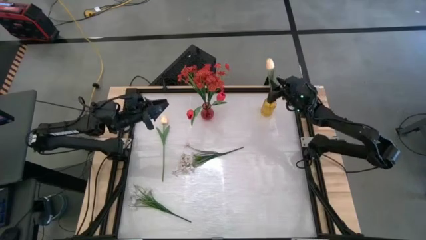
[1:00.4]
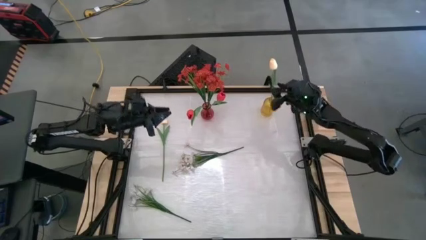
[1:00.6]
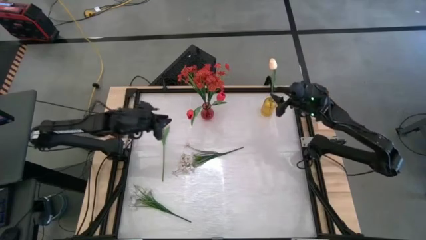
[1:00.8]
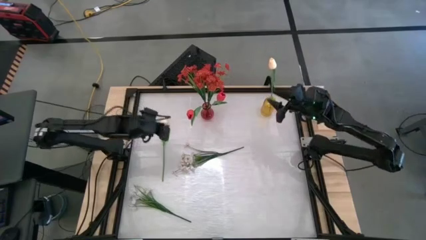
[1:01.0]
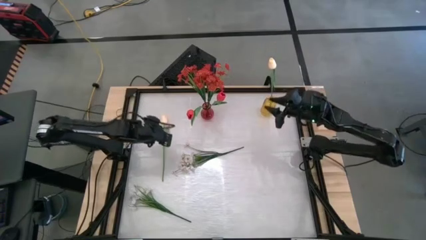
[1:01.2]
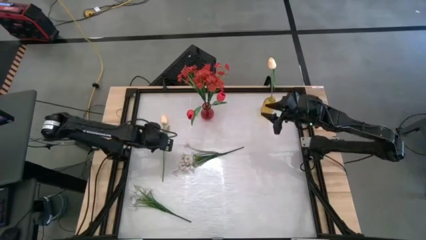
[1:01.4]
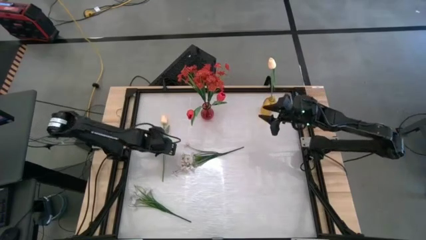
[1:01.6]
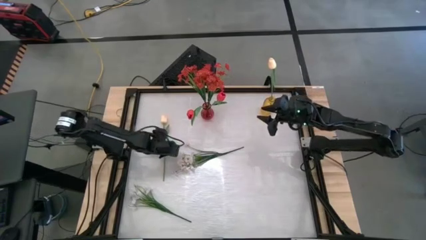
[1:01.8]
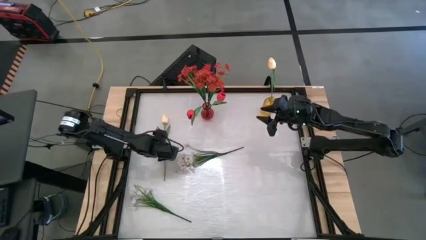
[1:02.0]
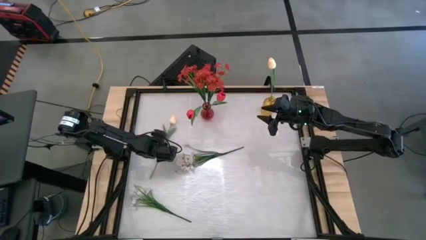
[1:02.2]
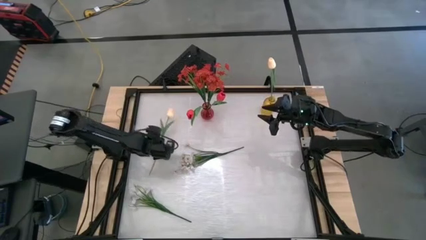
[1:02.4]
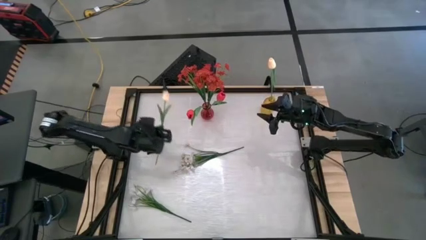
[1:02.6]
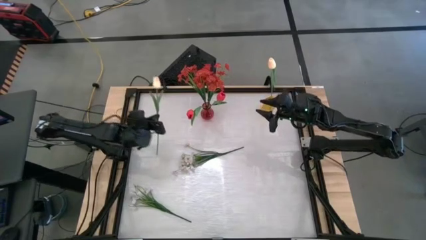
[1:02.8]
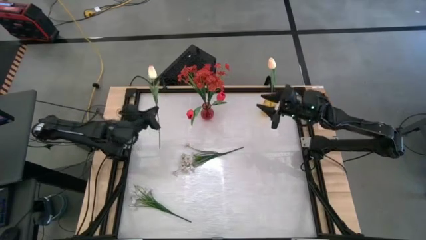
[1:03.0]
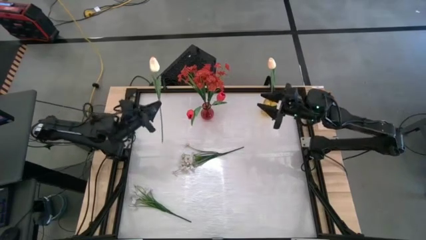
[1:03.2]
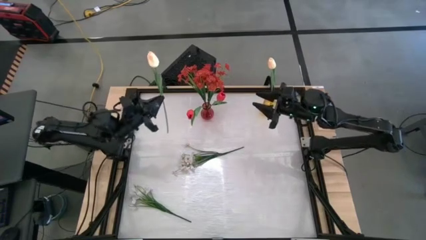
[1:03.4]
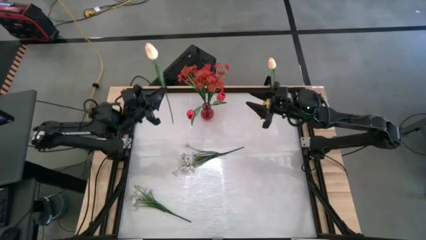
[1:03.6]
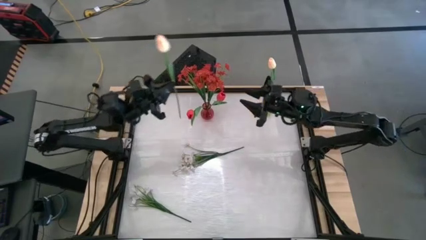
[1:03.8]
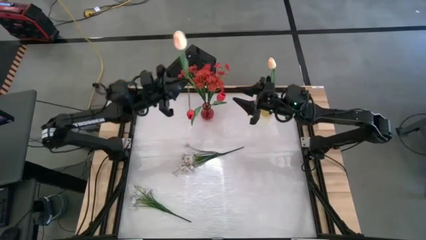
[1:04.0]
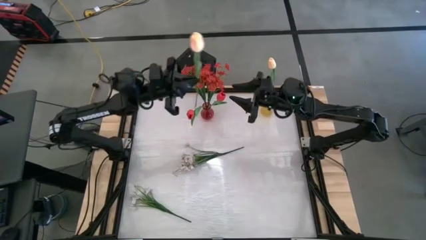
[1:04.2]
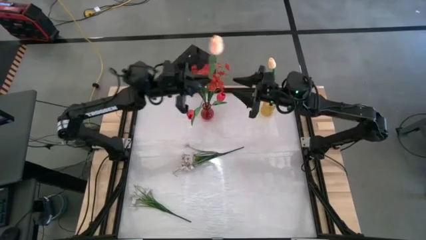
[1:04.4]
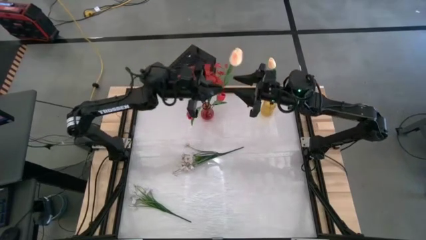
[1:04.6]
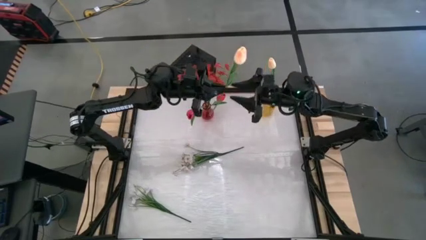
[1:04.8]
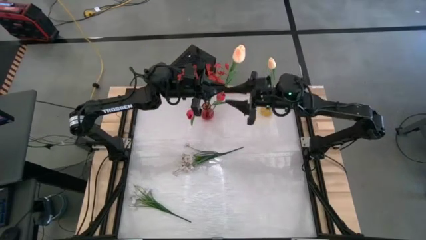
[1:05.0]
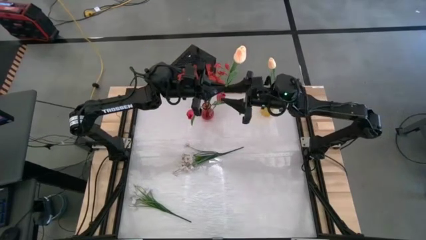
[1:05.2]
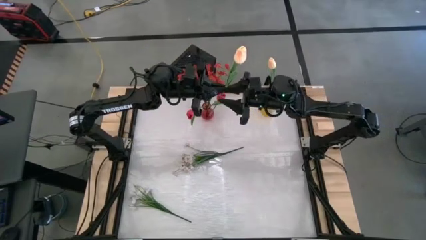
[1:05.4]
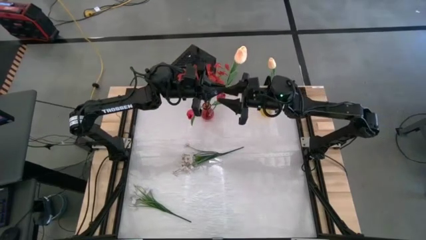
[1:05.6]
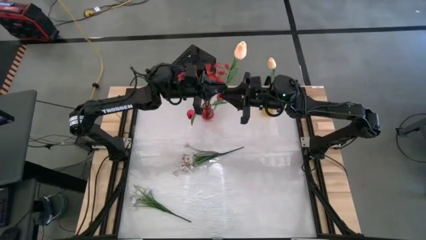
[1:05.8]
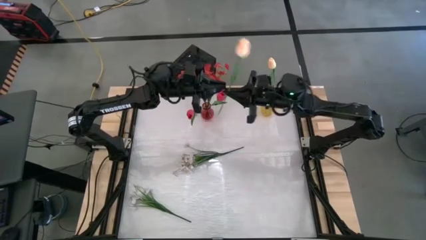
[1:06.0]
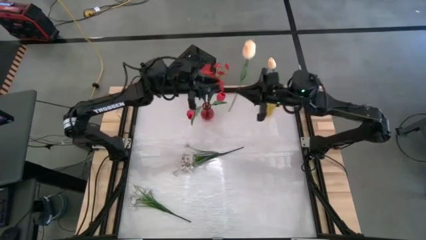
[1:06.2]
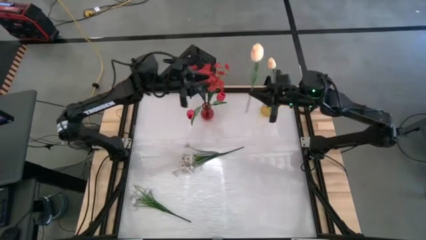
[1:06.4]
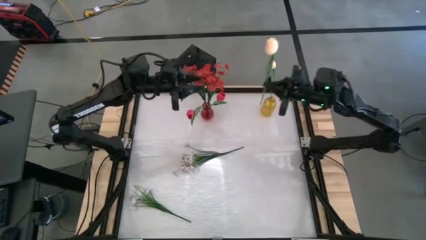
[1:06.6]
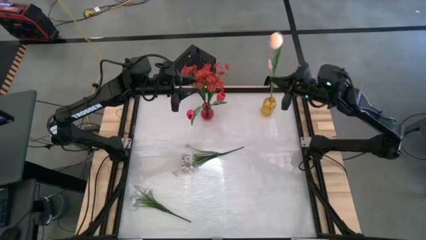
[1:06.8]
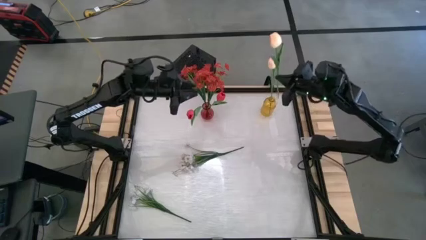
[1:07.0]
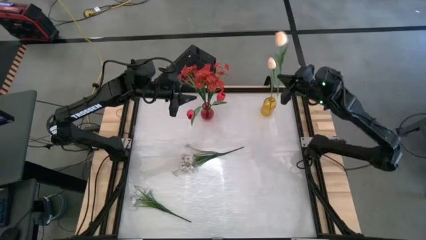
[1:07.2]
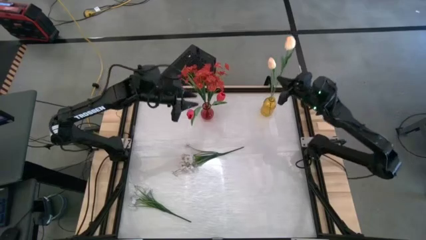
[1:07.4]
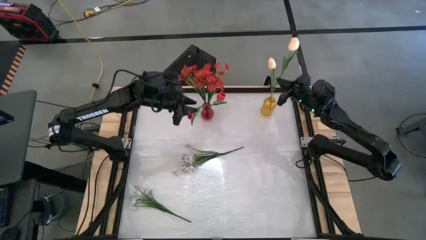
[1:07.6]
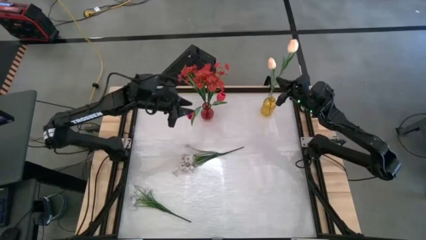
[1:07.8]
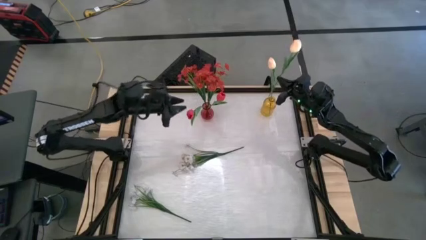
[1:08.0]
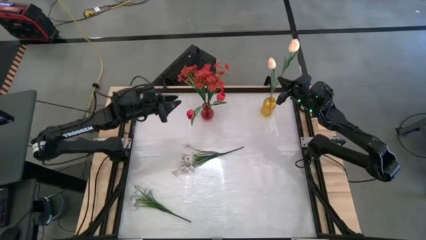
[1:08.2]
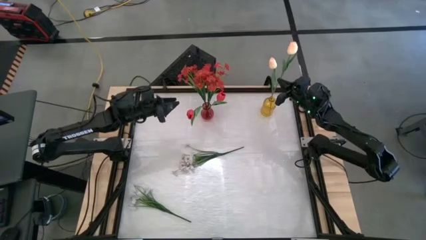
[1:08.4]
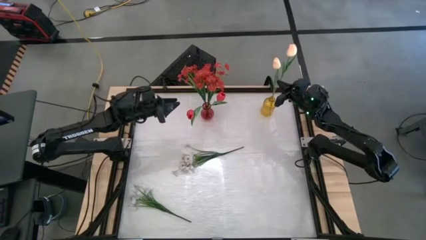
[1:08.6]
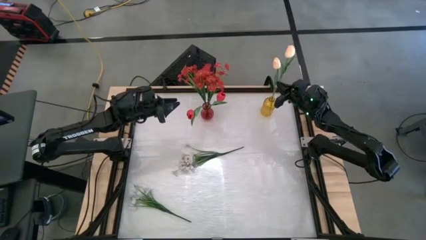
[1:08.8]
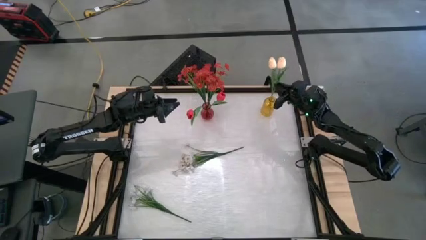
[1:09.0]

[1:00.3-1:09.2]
Task: Sort flowers into vase by color
Put the white flower into the yellow vase

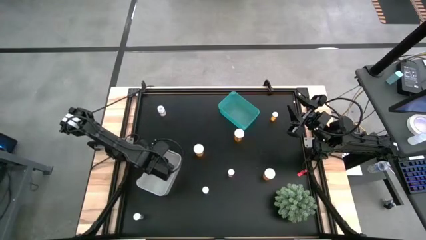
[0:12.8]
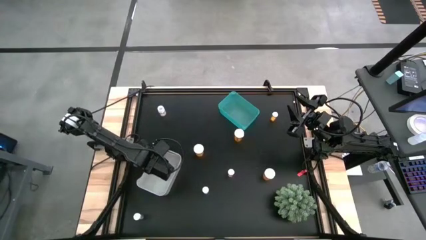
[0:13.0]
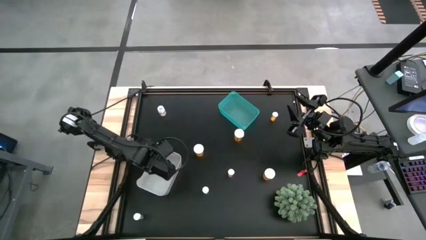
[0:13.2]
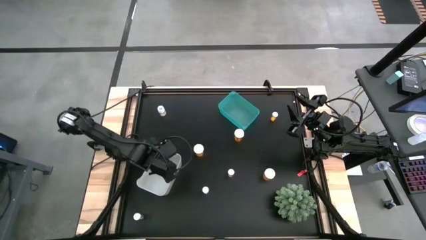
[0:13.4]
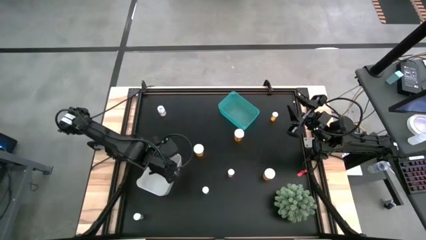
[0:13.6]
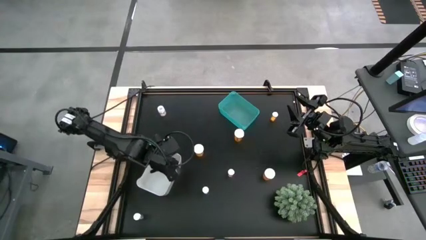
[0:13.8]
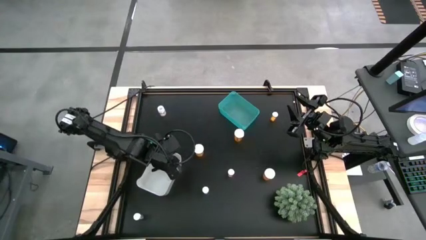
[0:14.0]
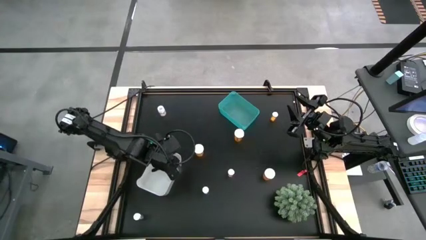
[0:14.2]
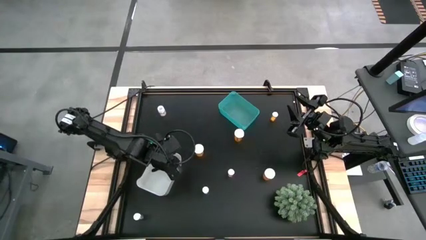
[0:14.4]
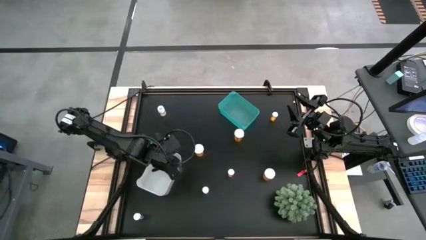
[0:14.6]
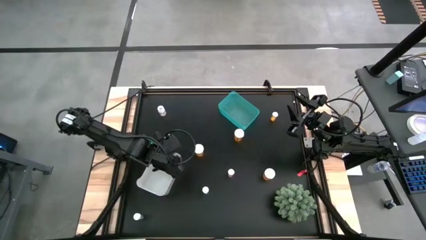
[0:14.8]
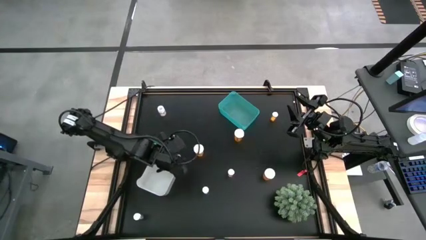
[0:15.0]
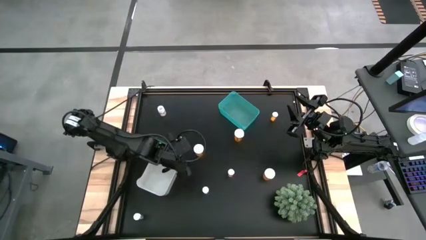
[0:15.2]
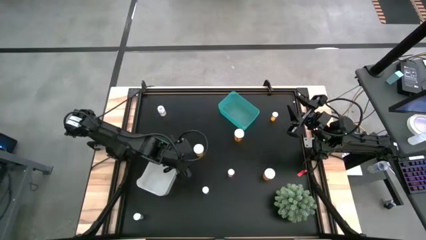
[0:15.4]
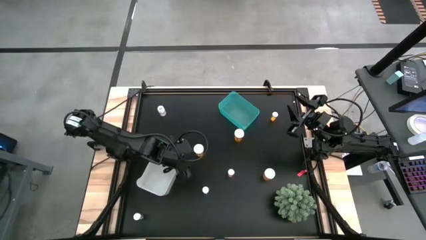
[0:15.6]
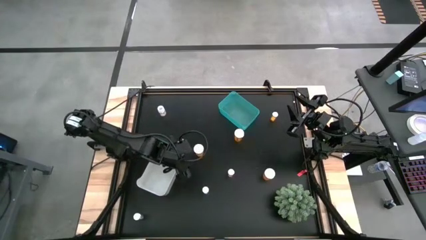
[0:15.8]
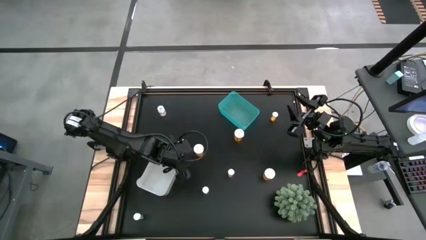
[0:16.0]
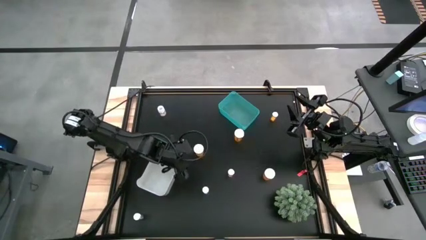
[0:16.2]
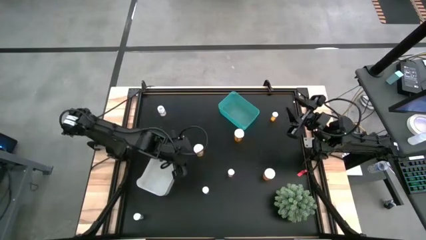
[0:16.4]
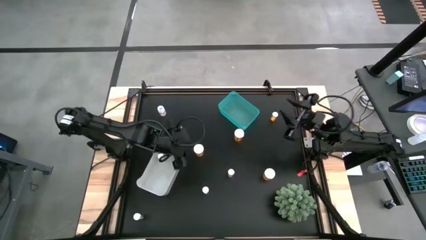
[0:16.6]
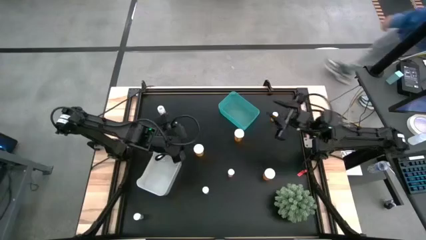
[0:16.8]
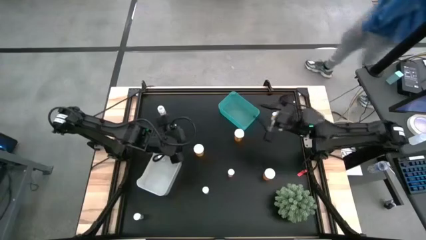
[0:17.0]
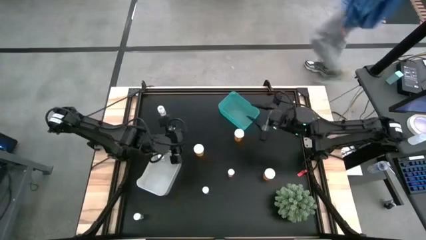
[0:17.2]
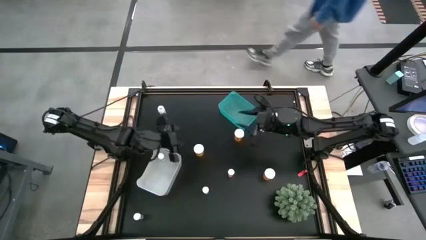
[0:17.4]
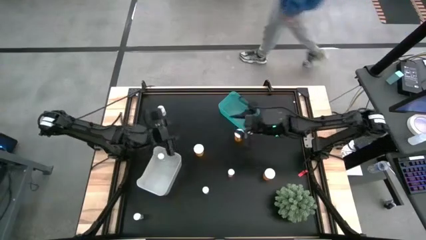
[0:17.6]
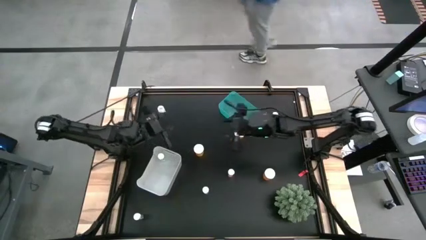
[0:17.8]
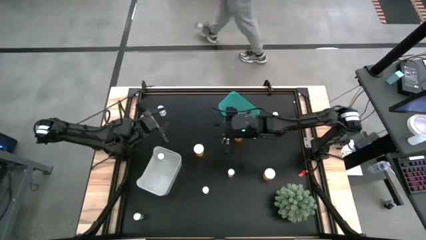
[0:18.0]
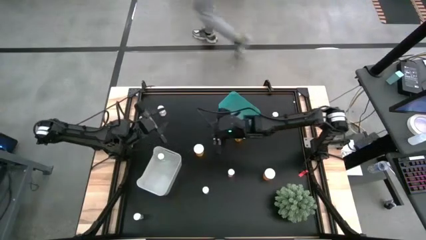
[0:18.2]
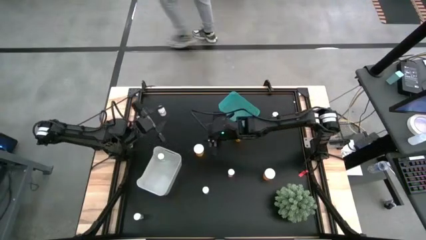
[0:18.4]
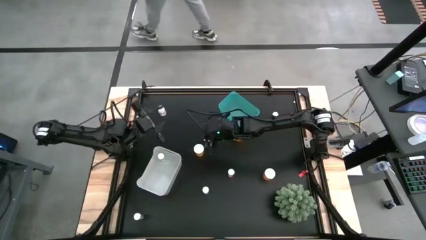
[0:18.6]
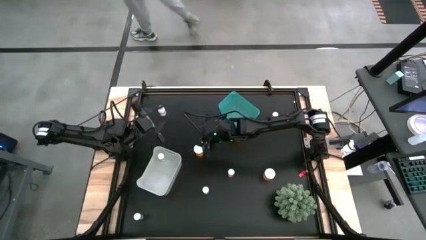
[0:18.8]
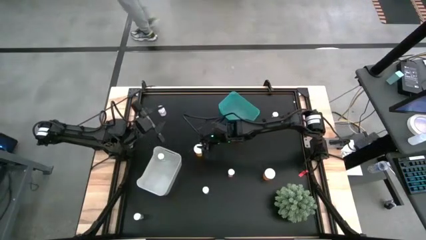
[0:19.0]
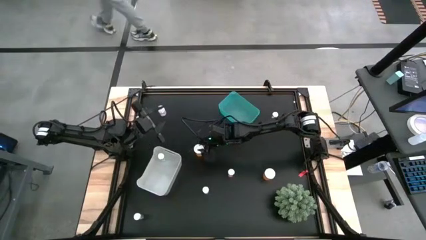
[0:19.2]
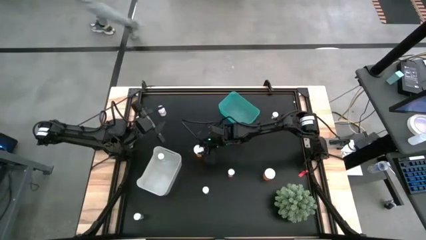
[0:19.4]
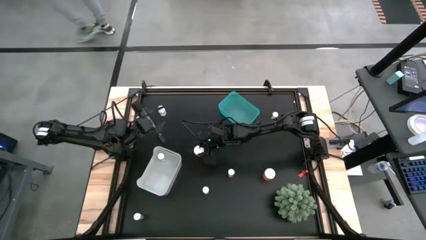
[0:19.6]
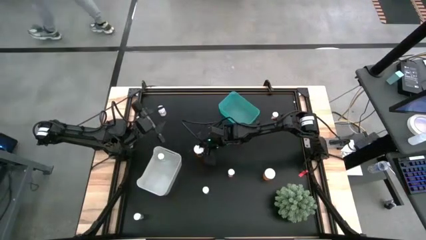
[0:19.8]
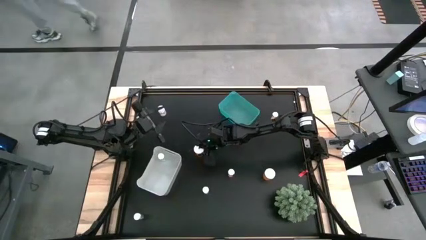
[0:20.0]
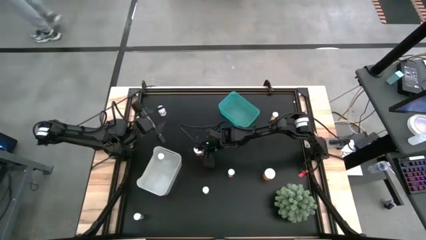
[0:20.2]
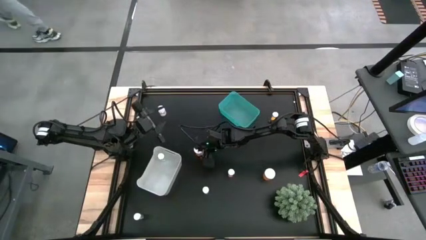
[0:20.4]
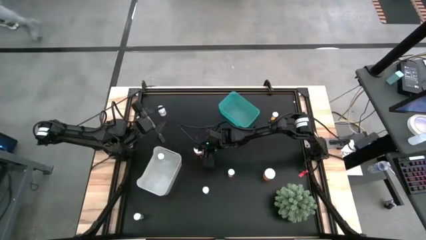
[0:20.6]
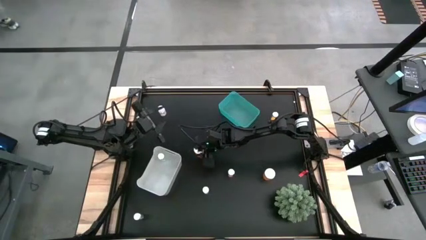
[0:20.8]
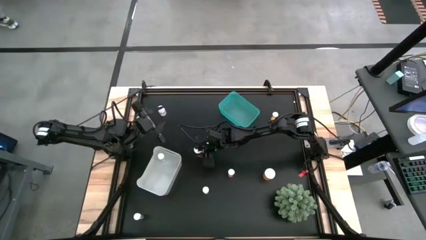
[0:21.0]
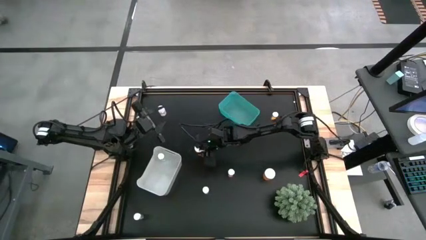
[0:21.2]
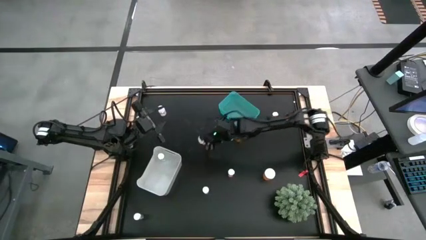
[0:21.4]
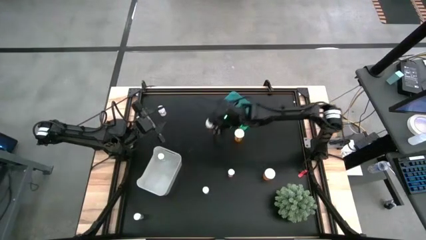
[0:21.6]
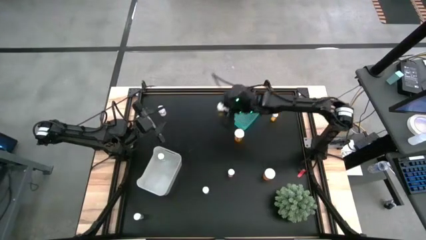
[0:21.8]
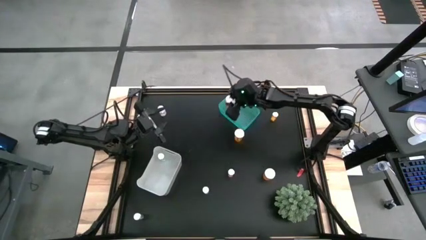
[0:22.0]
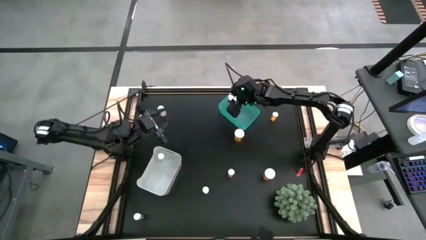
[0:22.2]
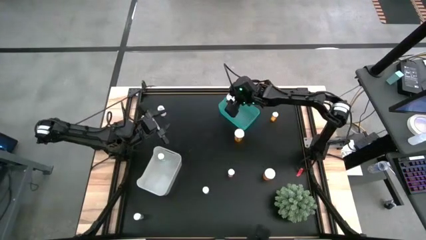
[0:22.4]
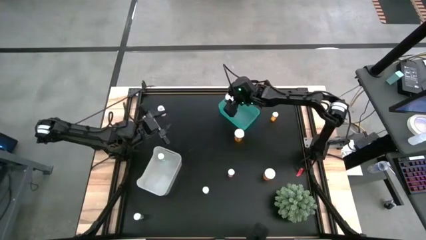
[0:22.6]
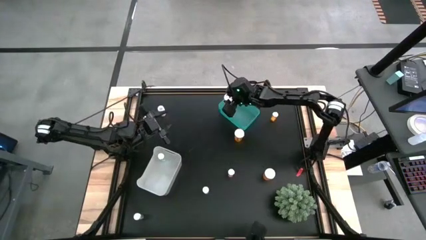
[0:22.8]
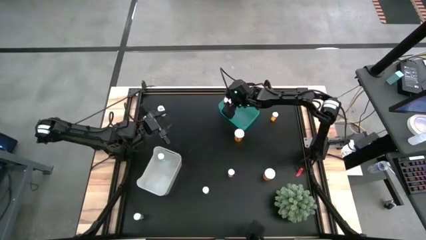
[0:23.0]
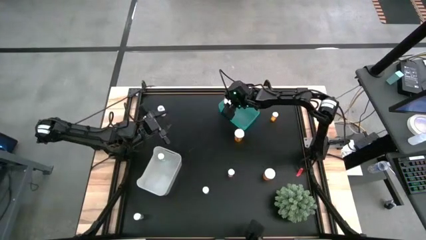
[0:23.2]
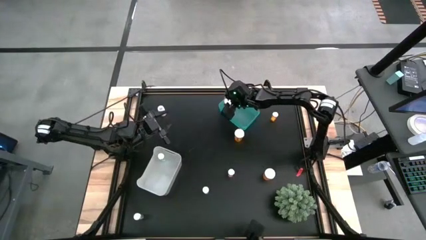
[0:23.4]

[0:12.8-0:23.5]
Task: Pick and place medicine bottles into bin by pill shape (circle, oval)
Put the middle left orange capsule bottle into the blue bin
